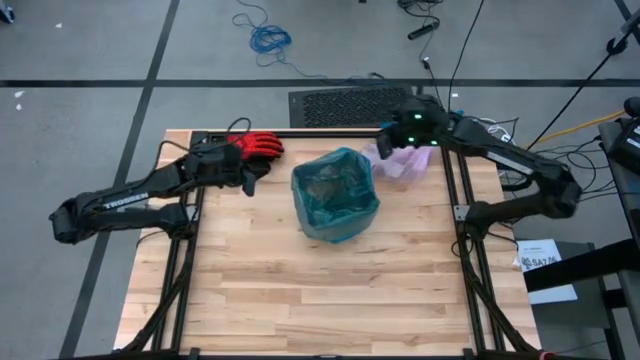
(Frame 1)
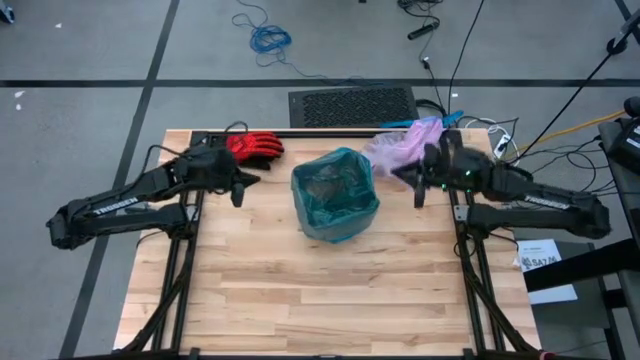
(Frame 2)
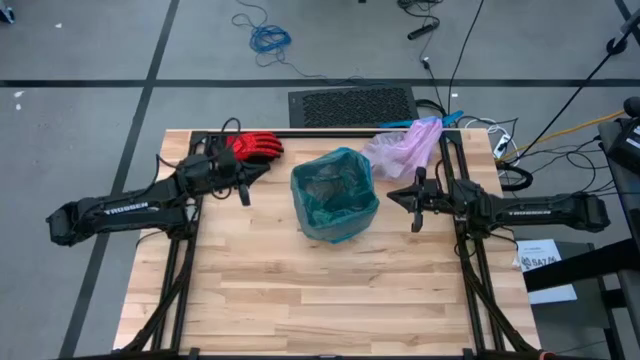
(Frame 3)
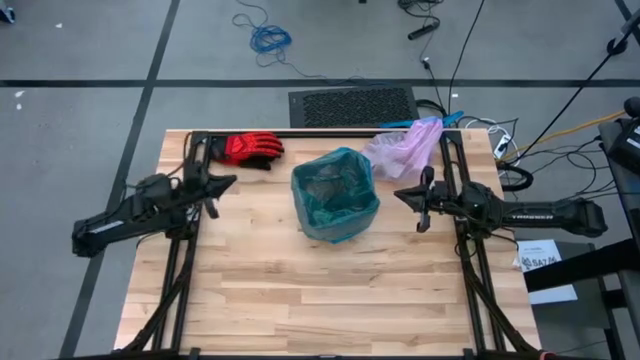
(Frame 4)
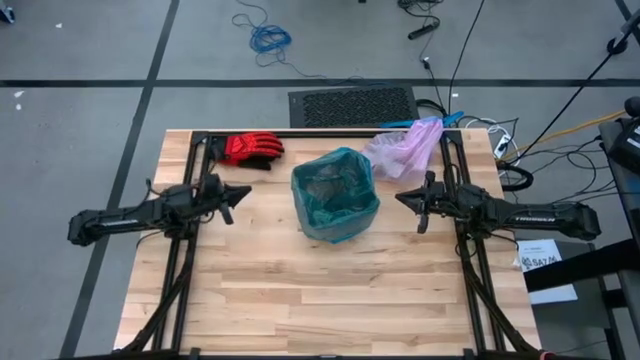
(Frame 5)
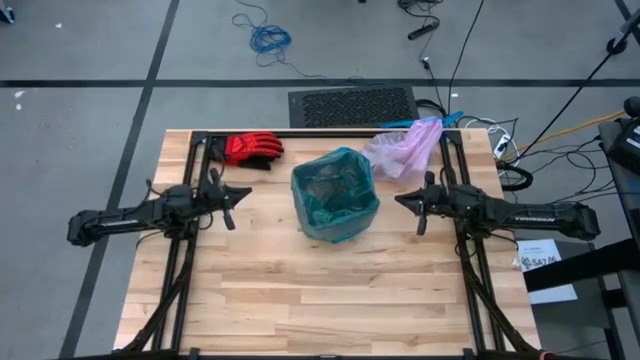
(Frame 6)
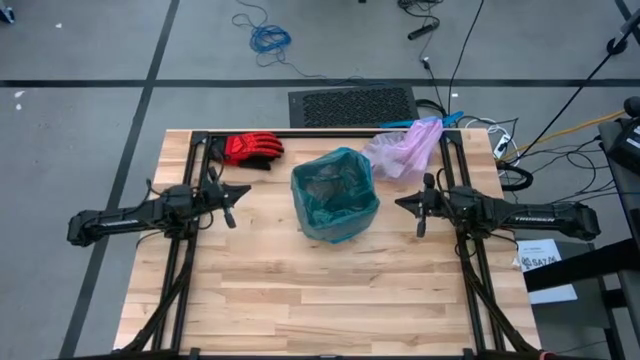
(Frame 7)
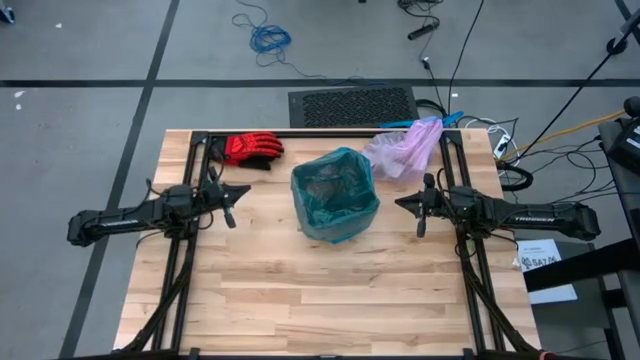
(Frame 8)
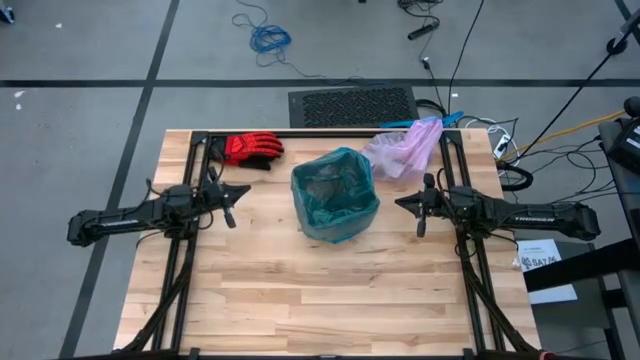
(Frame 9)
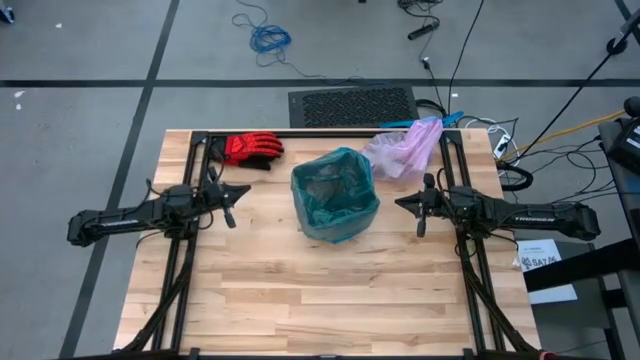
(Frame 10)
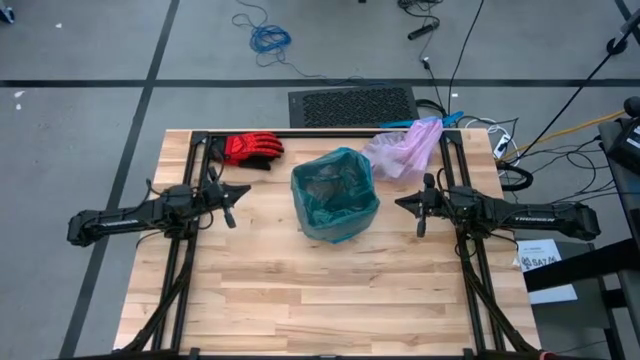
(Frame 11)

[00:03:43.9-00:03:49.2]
Task: place trash/remove bag and relplace
Return to Home Position

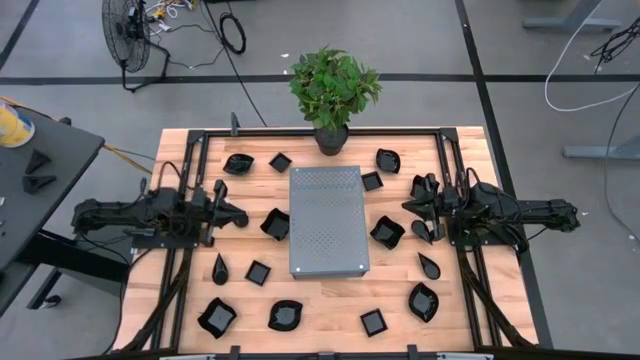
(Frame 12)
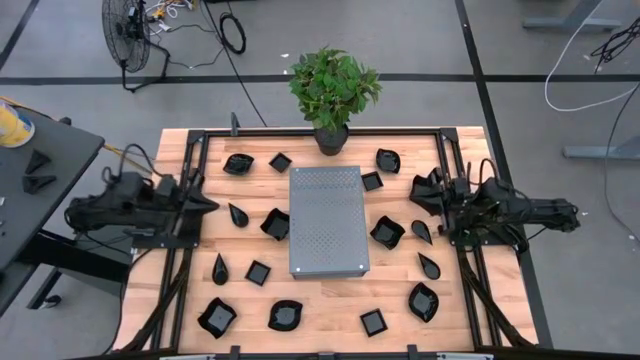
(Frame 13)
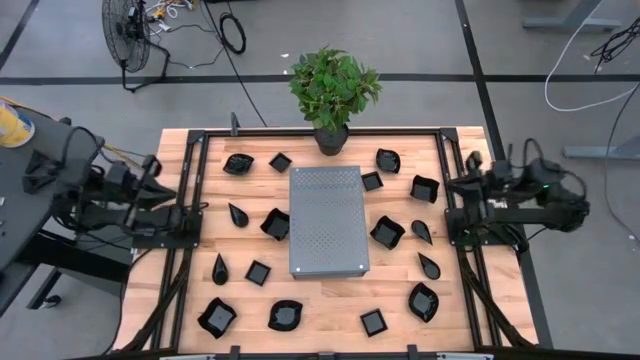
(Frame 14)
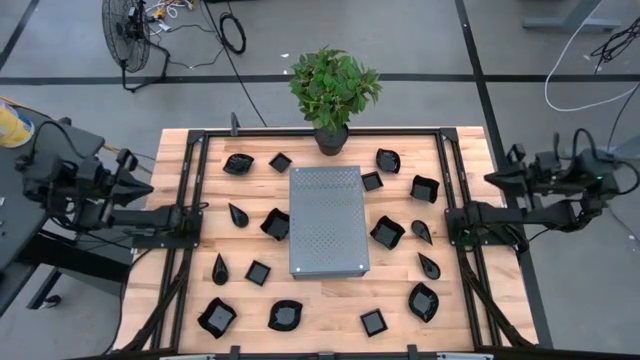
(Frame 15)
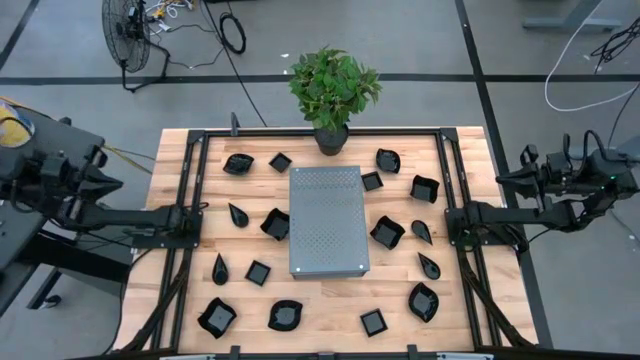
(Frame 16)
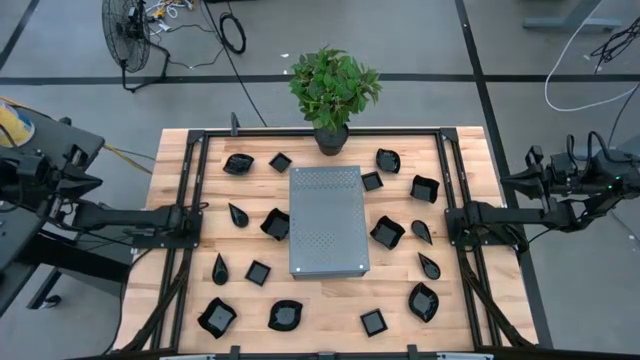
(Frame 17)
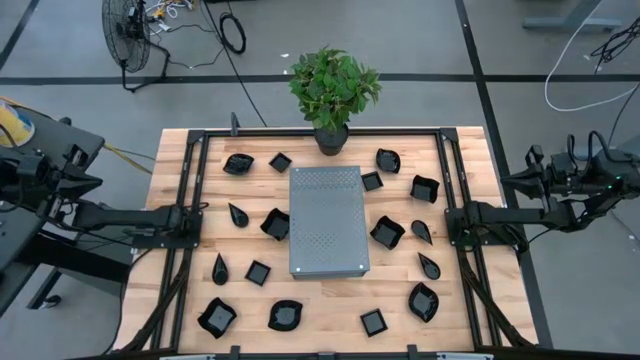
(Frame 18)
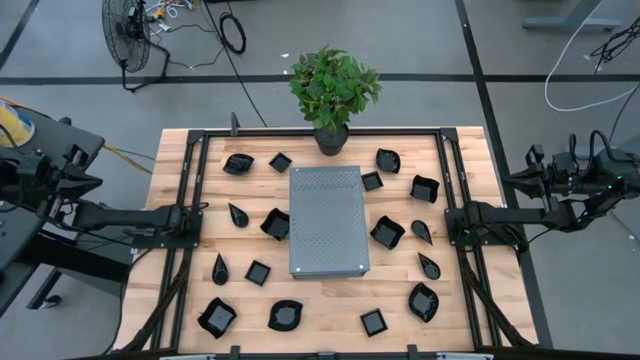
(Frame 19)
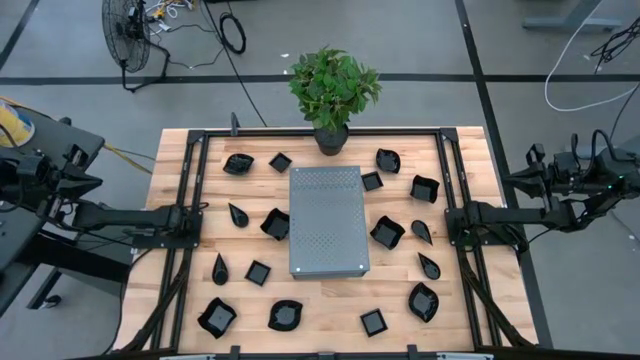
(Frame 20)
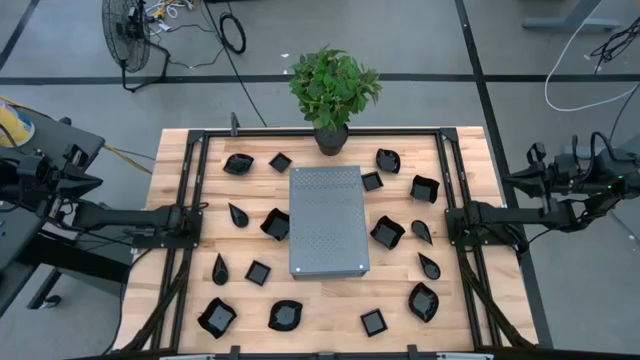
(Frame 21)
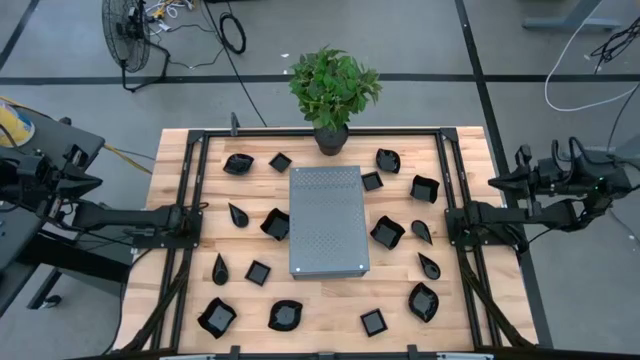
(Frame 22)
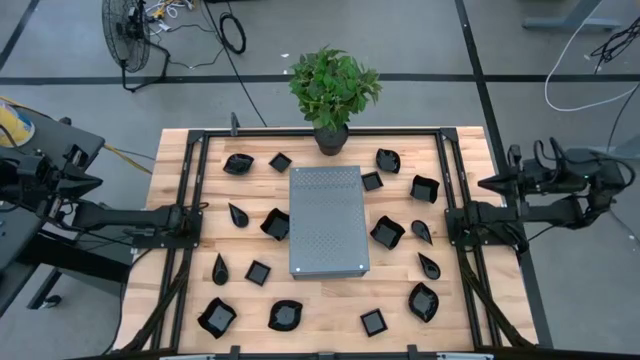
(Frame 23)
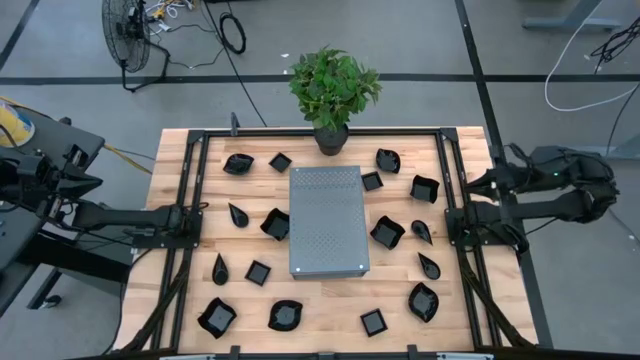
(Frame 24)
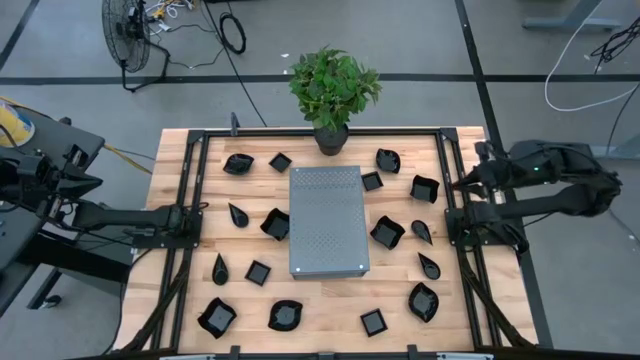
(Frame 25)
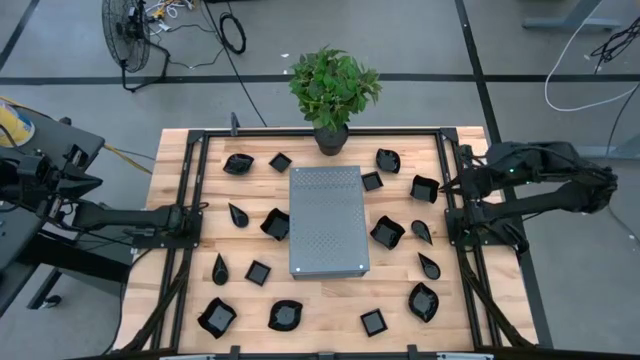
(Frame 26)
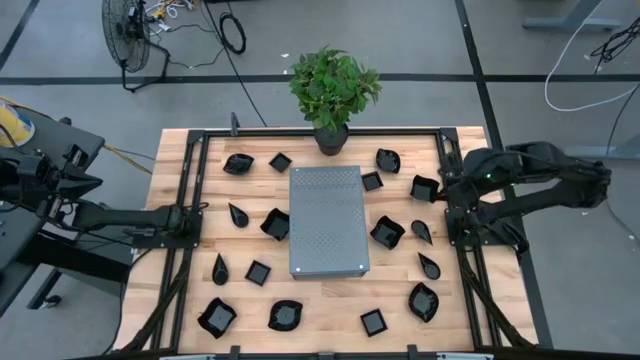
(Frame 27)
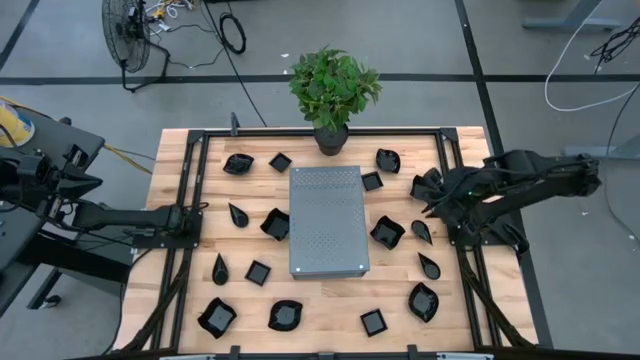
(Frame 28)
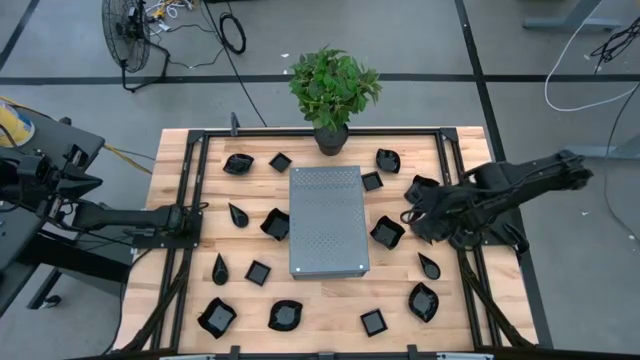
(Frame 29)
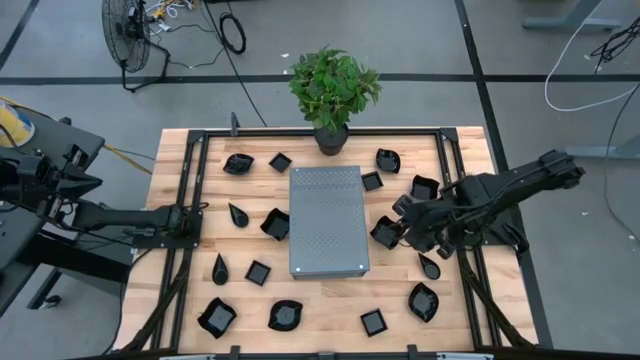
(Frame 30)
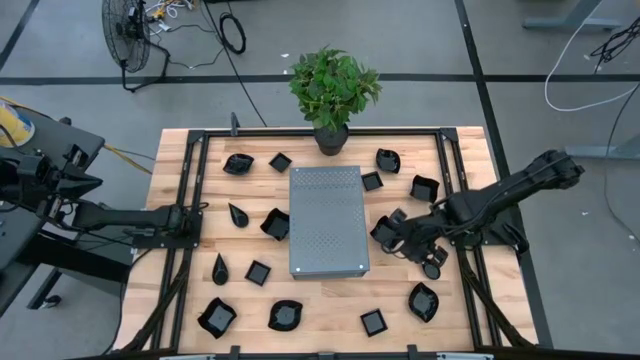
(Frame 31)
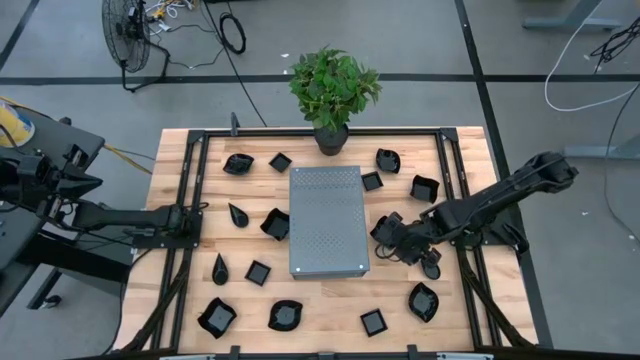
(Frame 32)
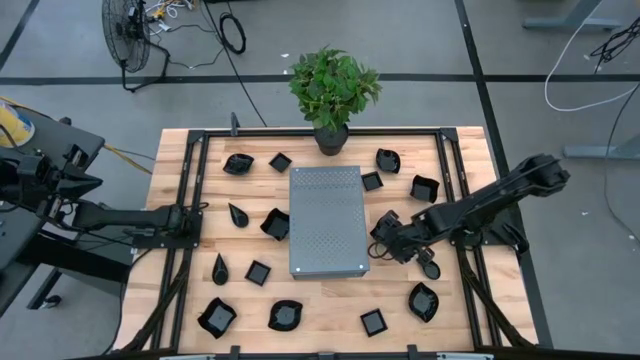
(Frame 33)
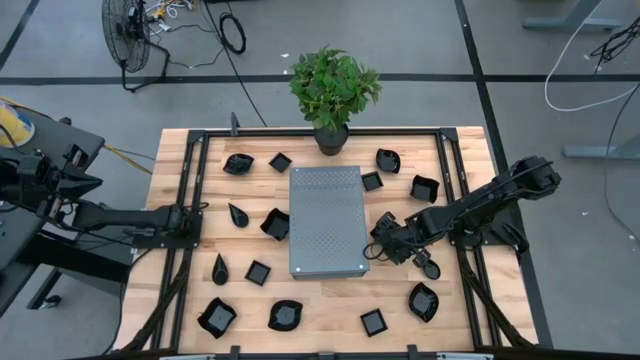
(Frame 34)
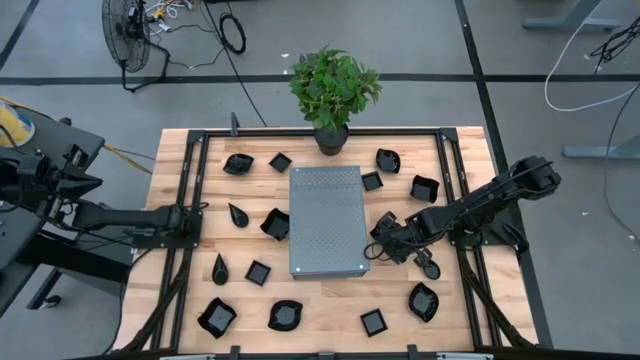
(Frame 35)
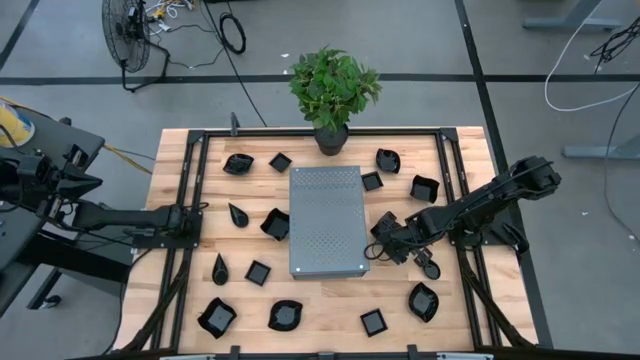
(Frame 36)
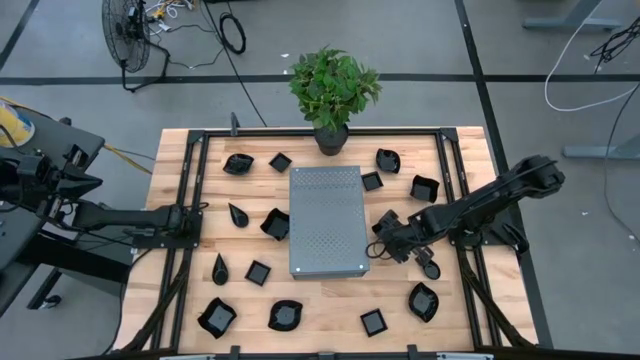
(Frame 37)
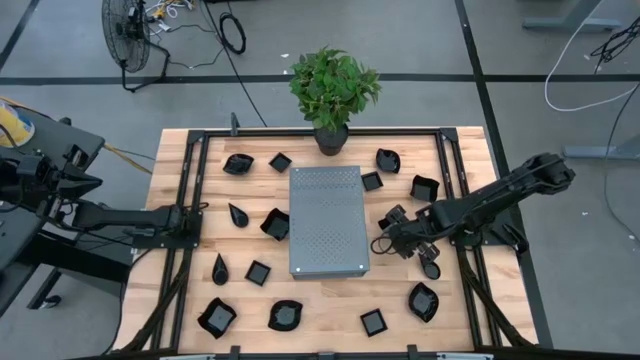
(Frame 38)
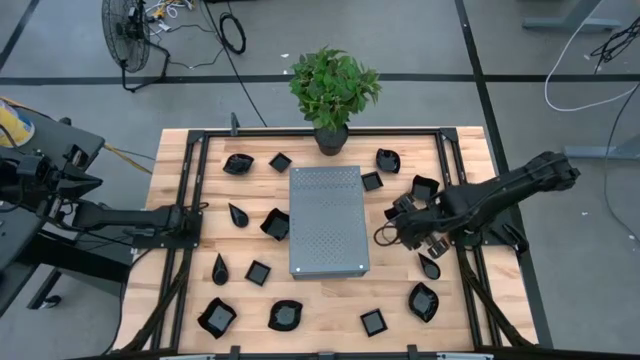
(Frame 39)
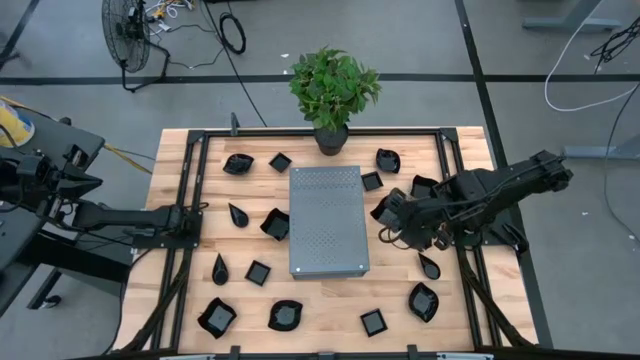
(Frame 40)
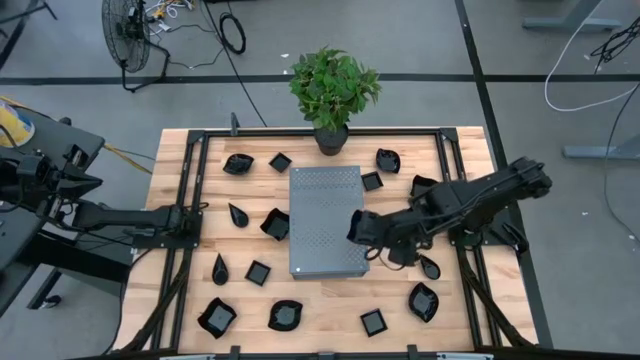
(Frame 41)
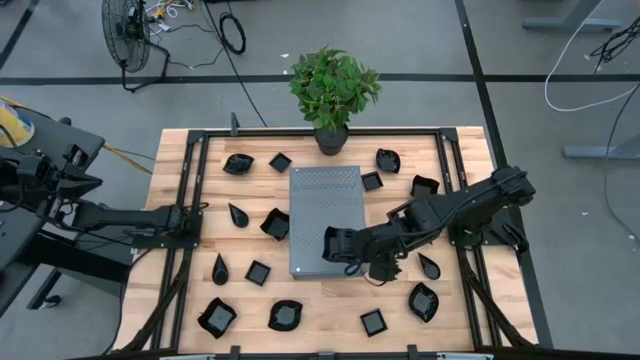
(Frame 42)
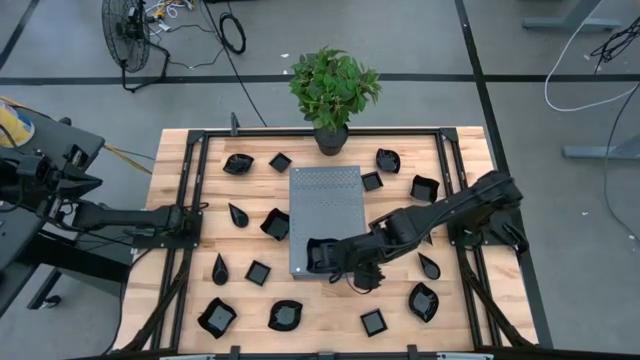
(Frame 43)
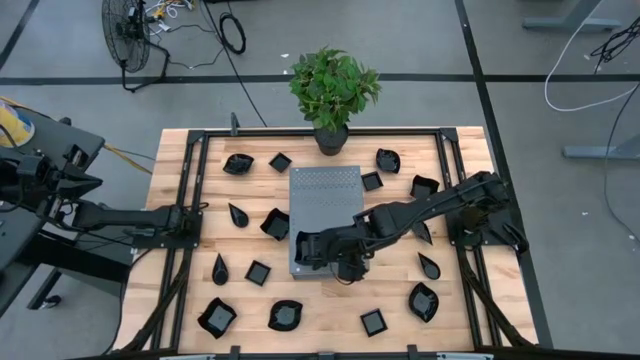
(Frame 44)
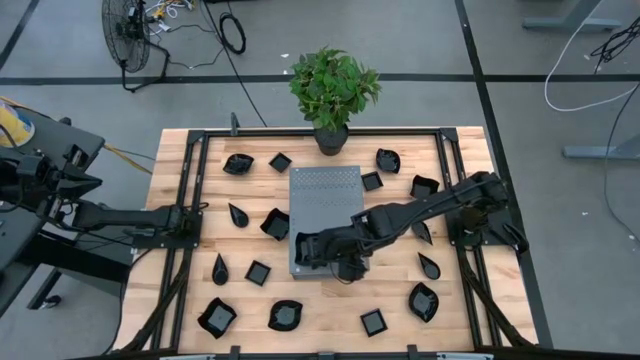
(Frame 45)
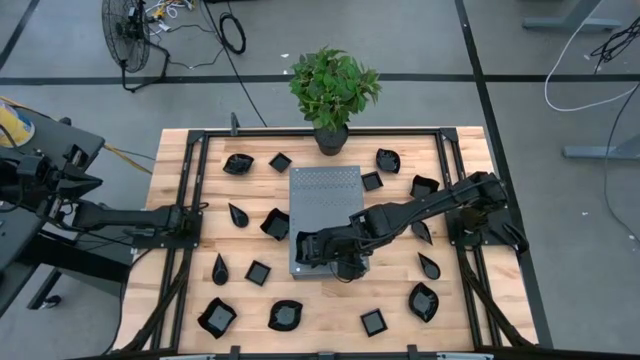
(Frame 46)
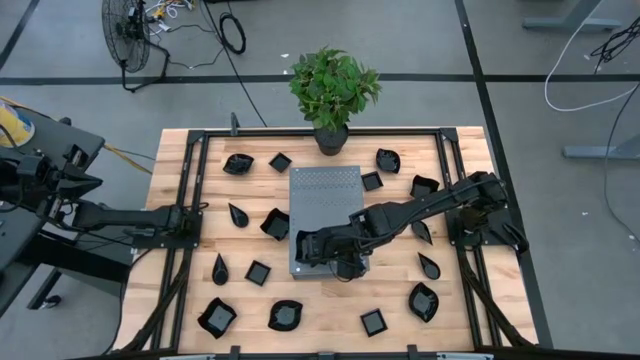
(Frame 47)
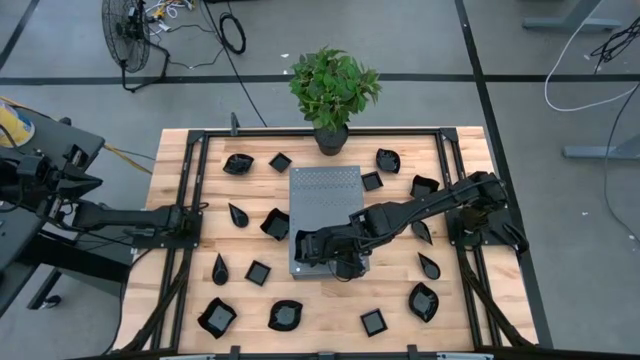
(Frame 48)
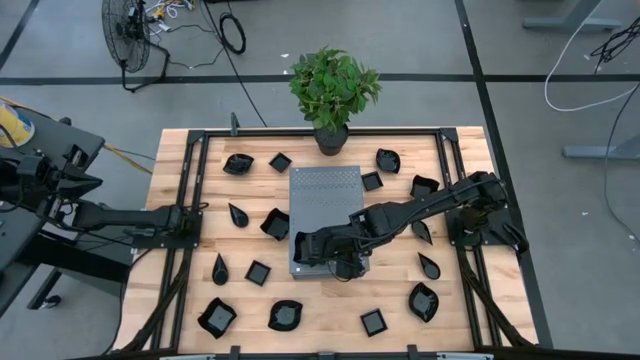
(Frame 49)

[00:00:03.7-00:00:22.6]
Task: Pick & Place Mini shaped plates
Put the black bowl on the shelf
